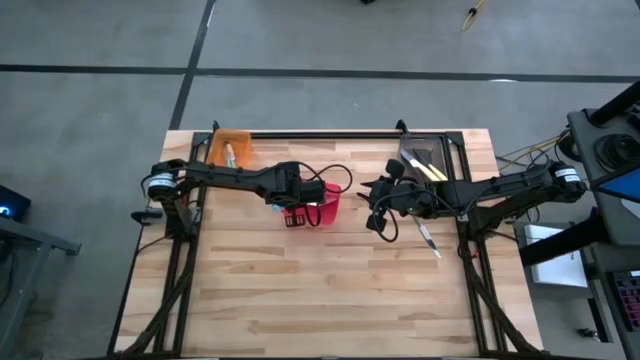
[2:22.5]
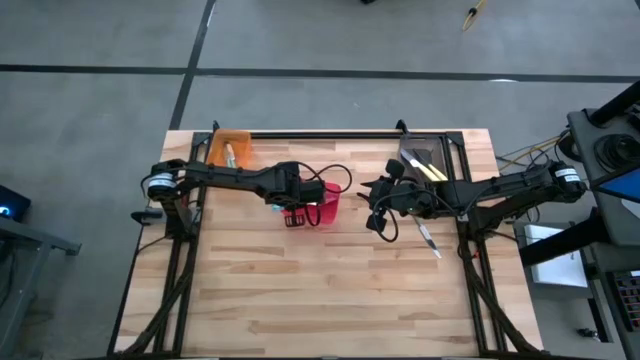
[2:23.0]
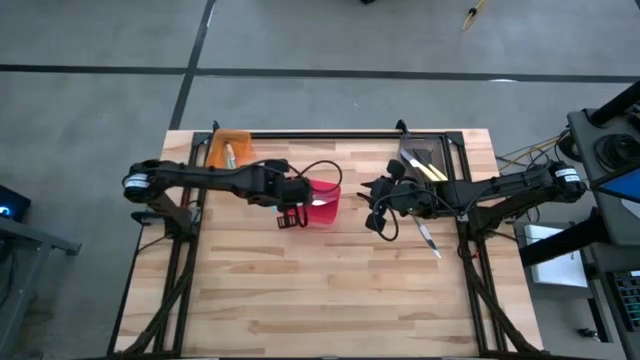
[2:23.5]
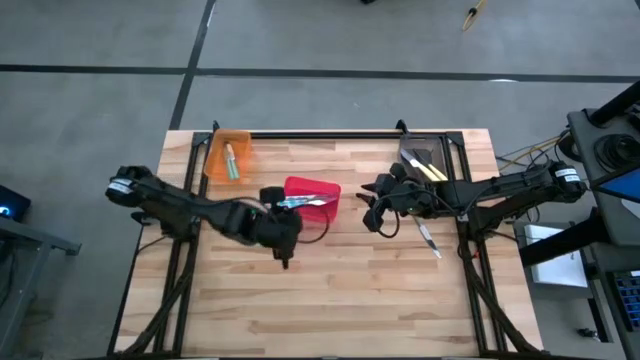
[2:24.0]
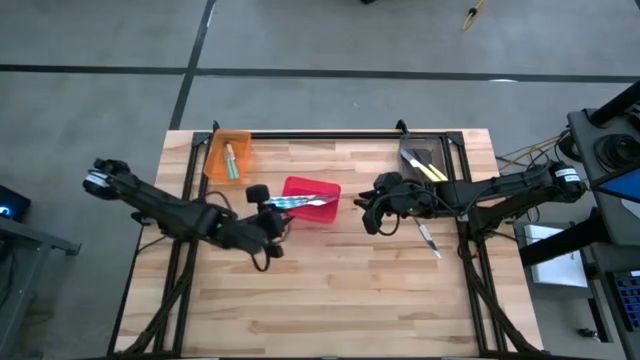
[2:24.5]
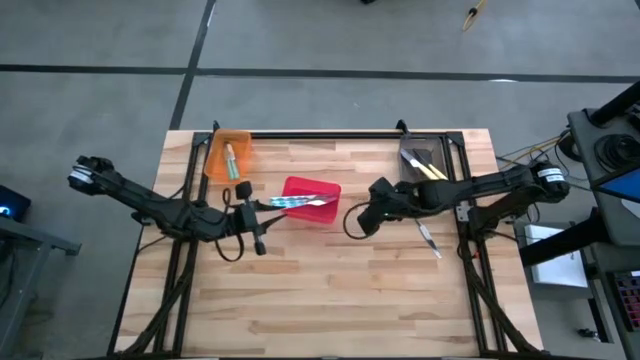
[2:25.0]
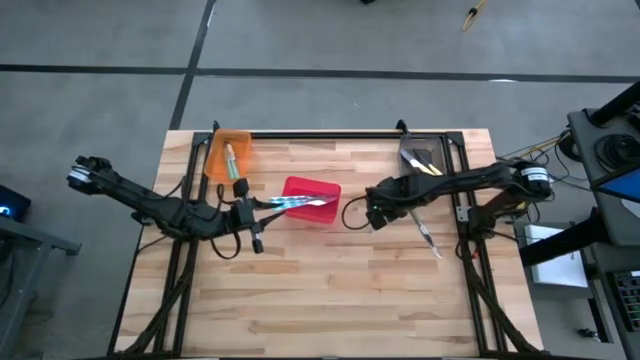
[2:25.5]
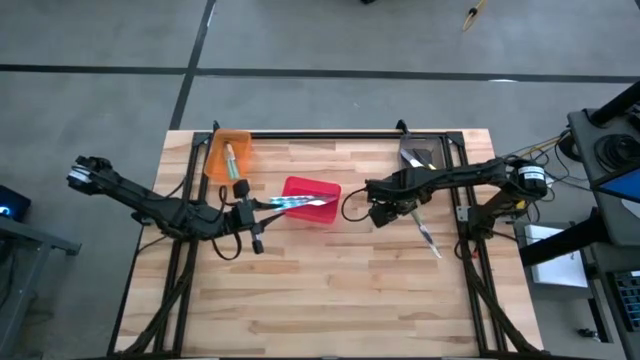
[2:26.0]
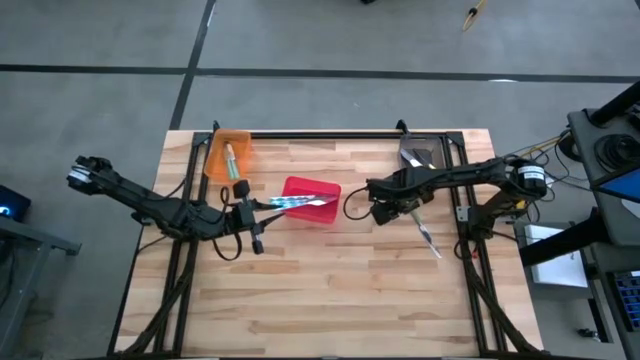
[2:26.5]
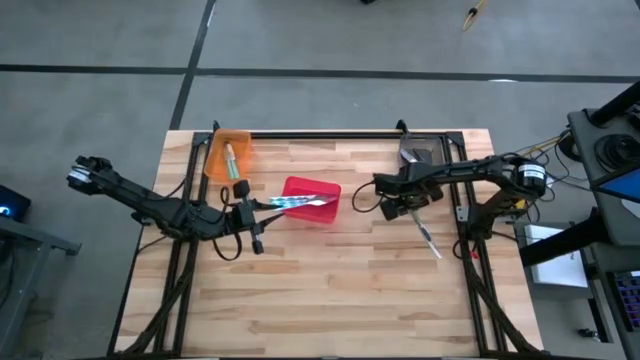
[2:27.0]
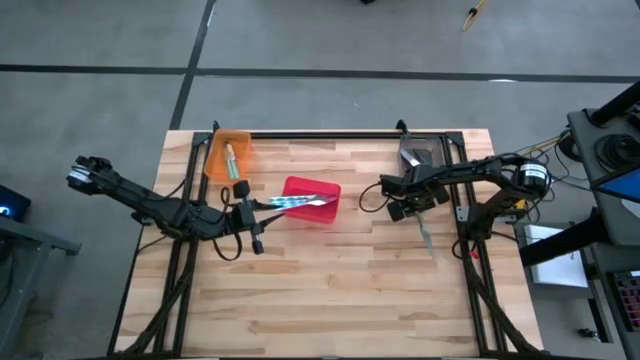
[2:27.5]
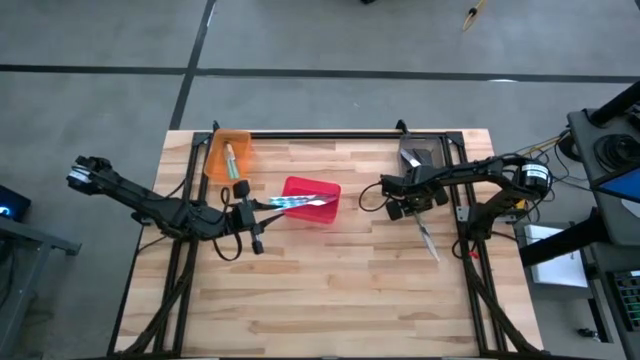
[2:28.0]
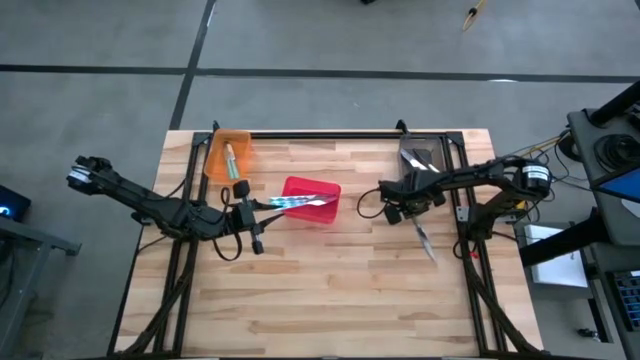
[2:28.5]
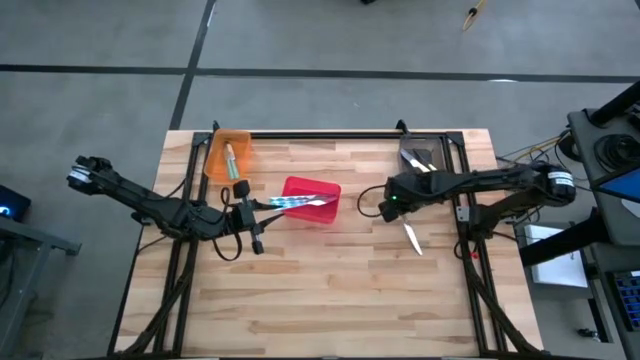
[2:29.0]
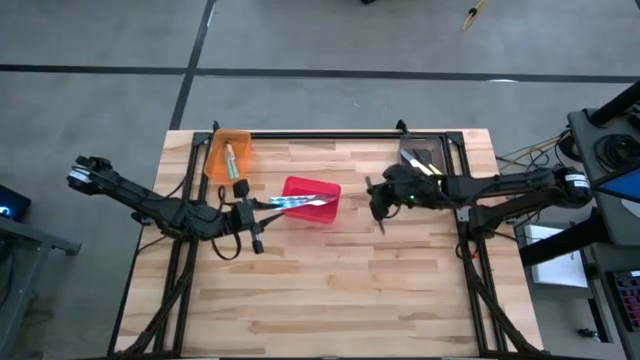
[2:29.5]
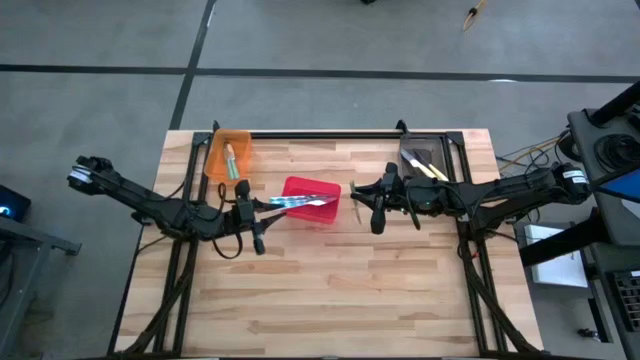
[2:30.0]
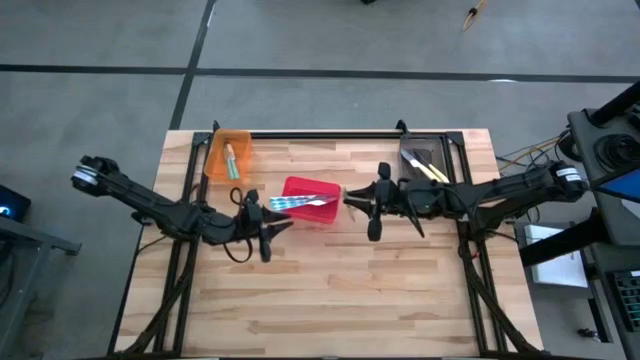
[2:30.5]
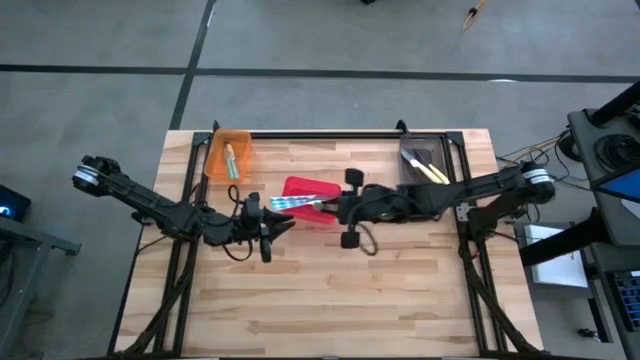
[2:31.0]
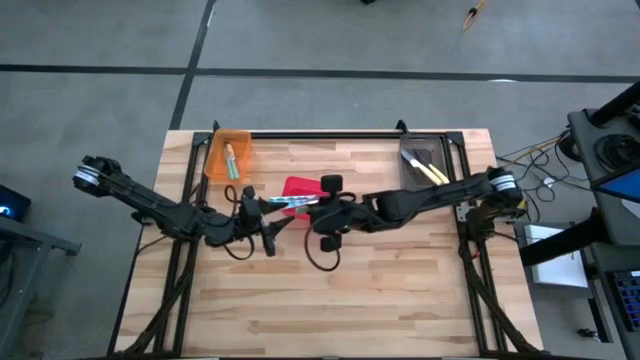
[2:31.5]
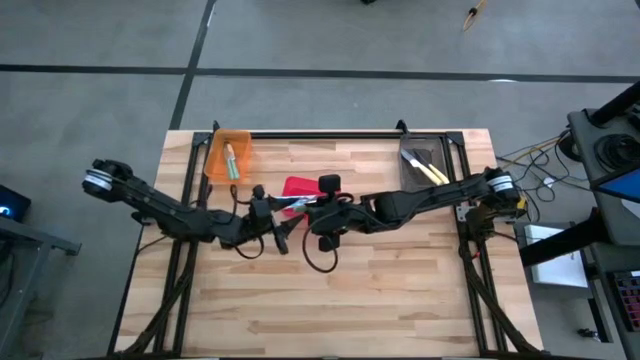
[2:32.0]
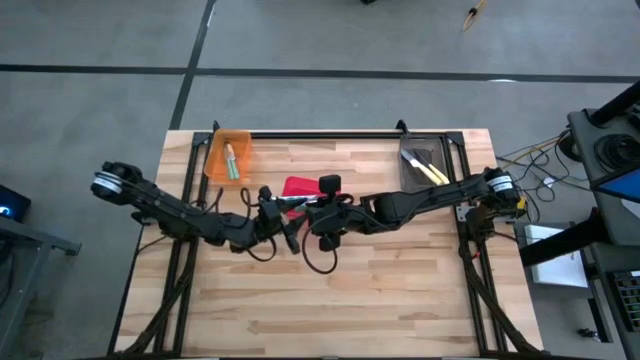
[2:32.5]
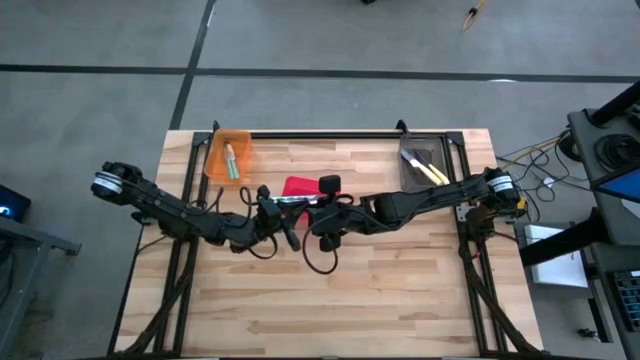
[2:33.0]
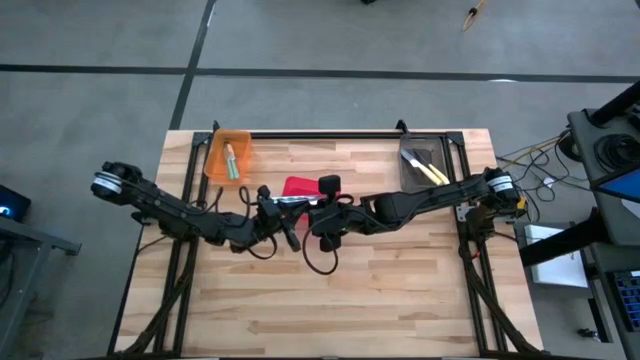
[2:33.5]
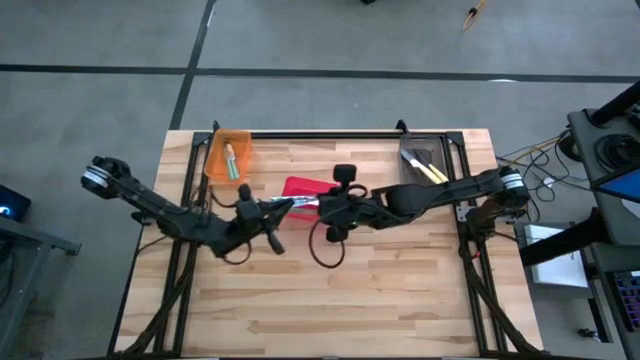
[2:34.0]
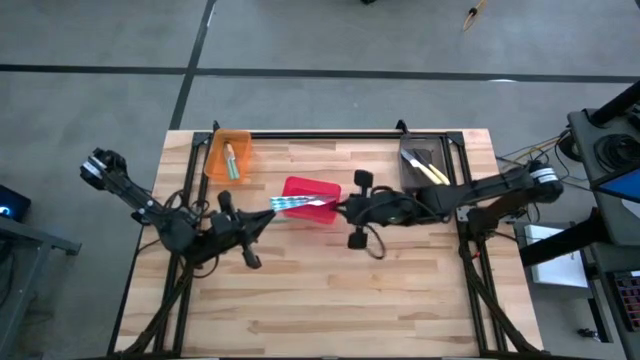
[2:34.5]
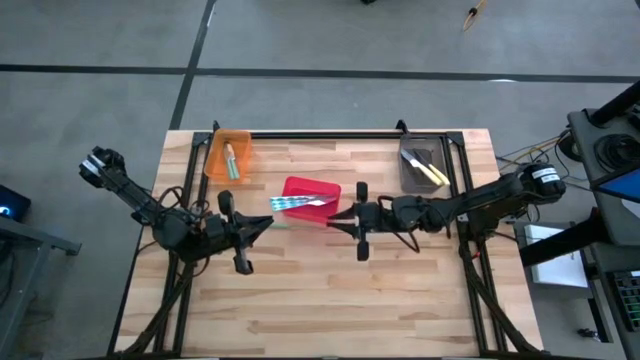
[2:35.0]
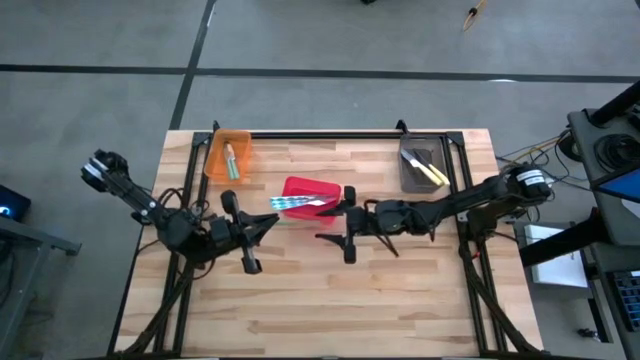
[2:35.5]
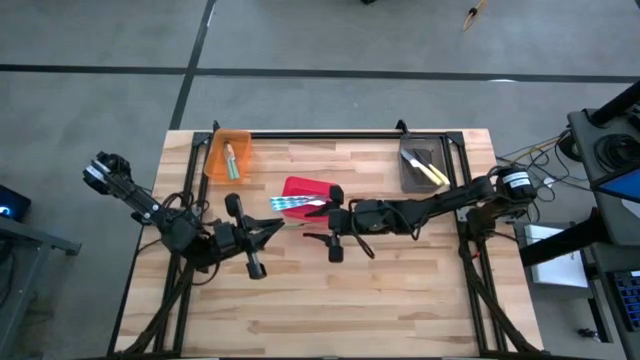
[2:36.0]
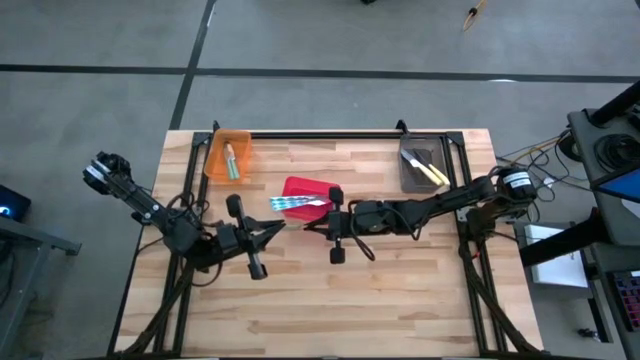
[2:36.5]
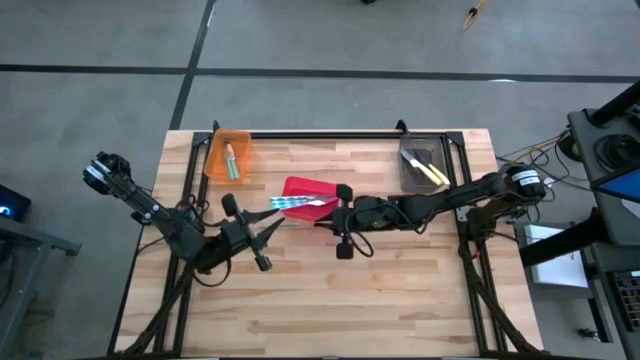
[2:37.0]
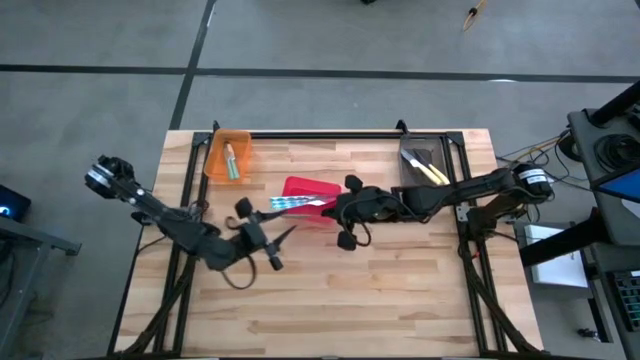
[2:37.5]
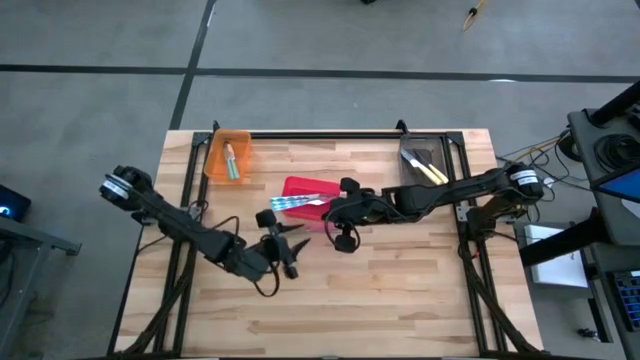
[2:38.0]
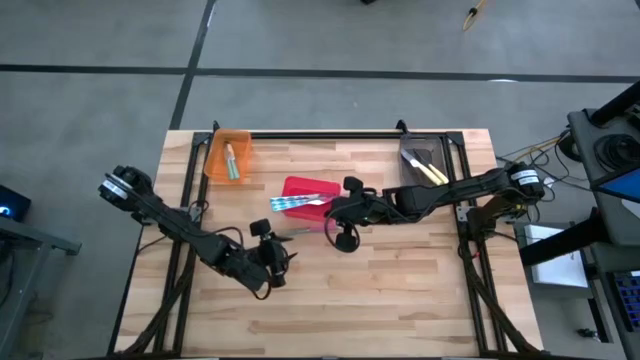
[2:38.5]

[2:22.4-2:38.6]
Task: Sort silverware by color (type)
Put the green table knife into the orange bin

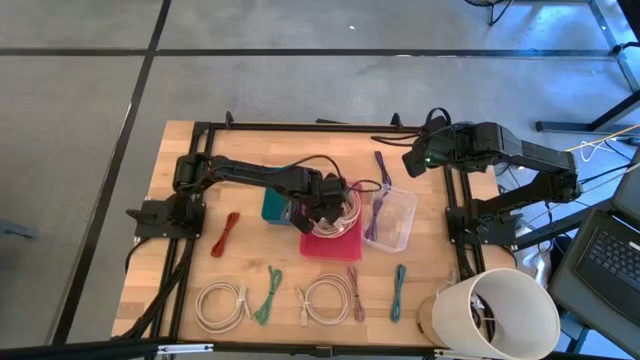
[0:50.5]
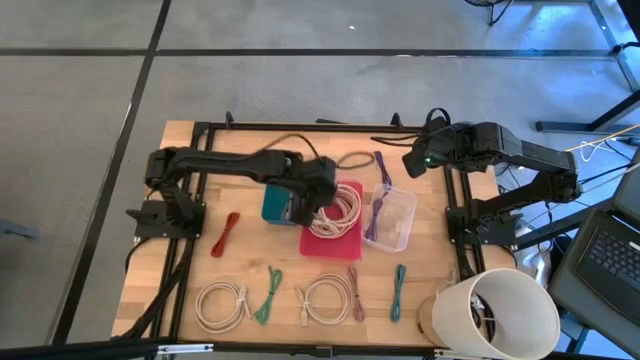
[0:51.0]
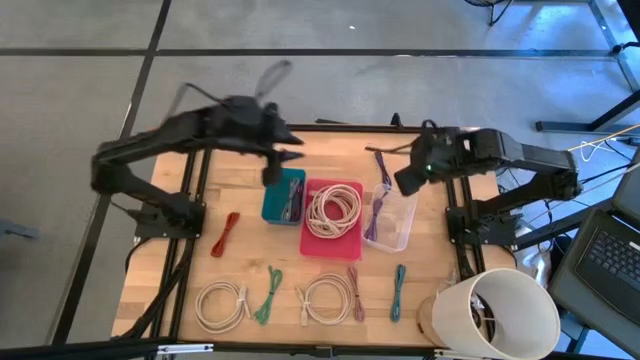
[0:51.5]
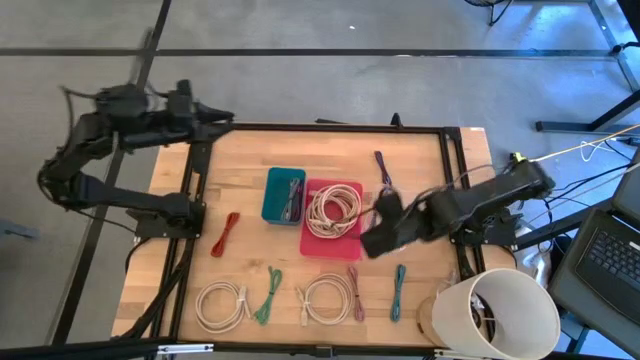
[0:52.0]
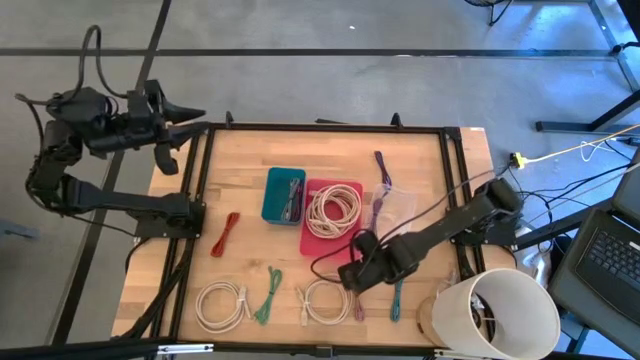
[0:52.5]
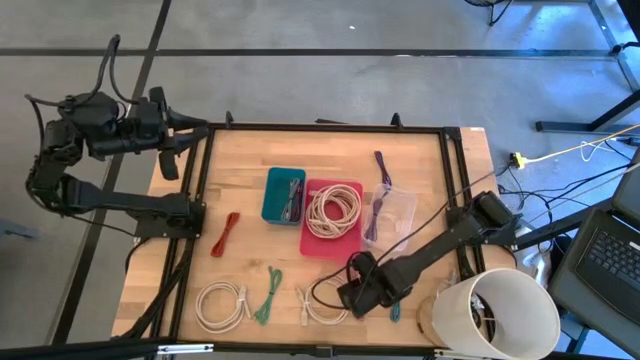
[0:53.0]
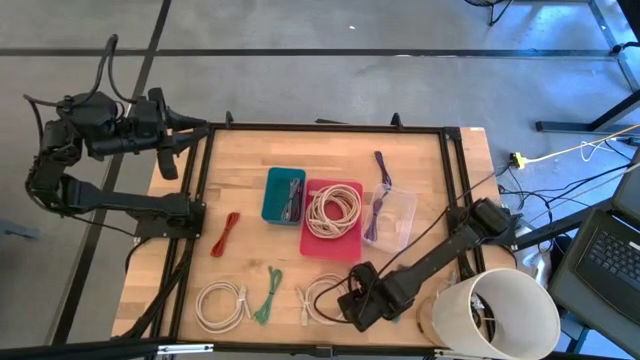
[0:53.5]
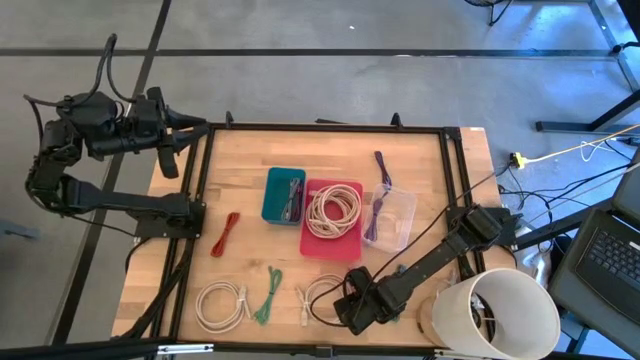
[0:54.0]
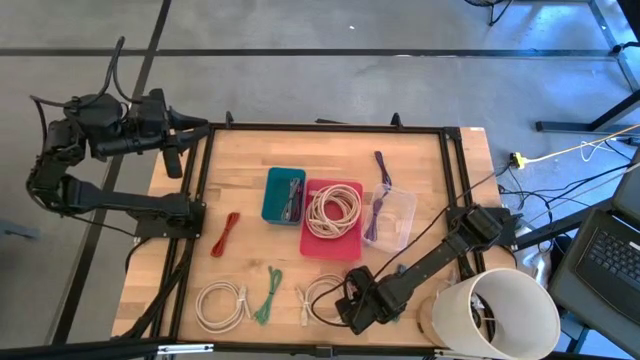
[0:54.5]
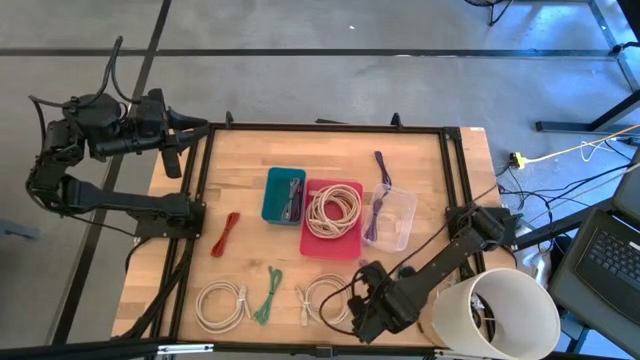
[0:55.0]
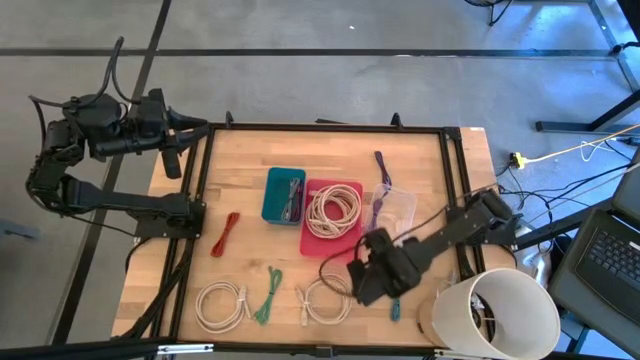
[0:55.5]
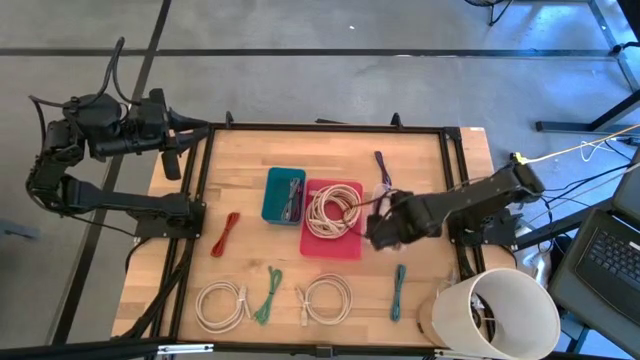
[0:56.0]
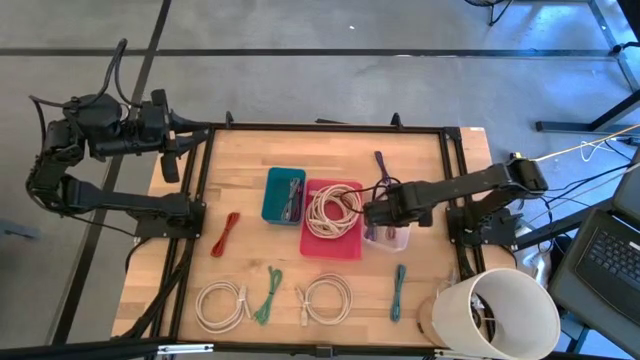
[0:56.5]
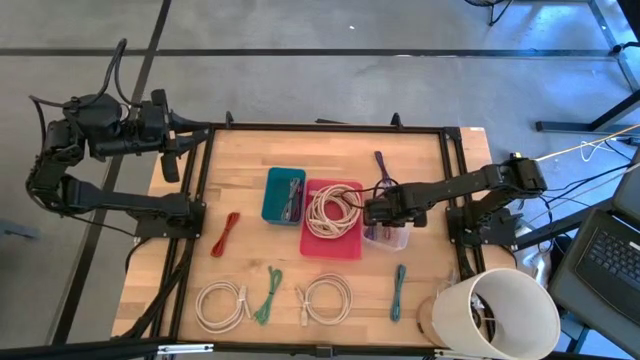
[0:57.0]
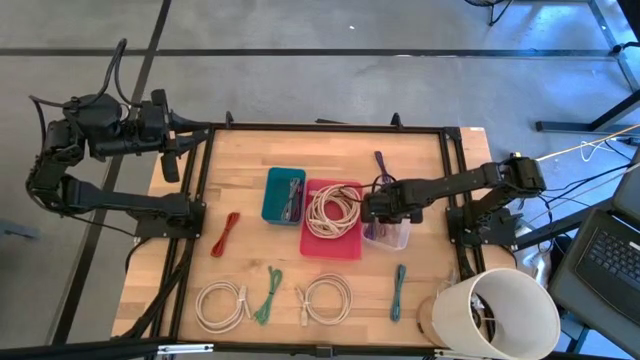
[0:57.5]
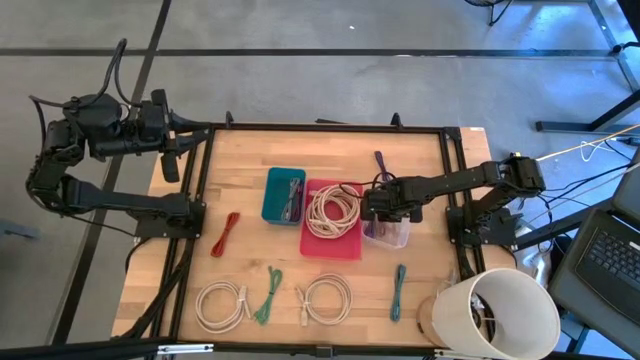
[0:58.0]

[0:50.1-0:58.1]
Task: Pick & Place USB Port
Put the light pink charger cable into the transparent bin
